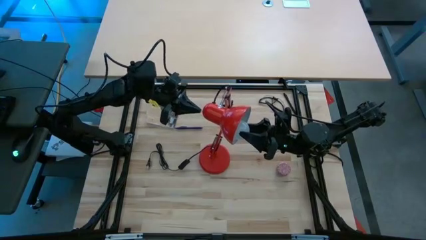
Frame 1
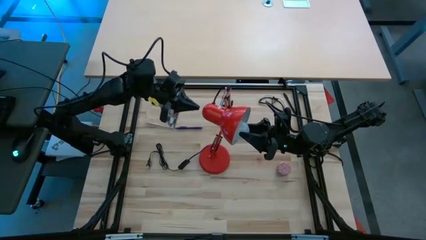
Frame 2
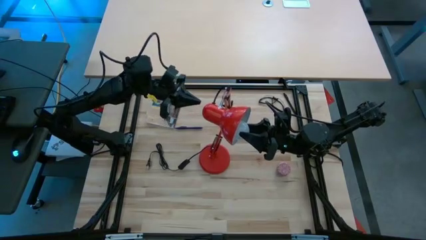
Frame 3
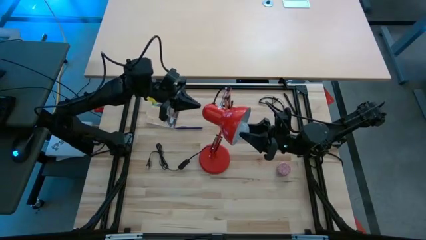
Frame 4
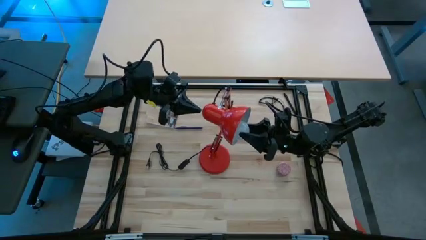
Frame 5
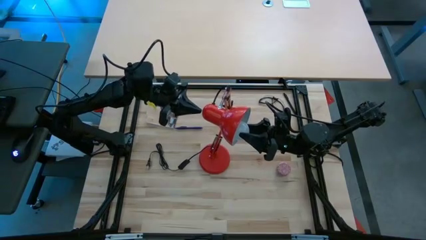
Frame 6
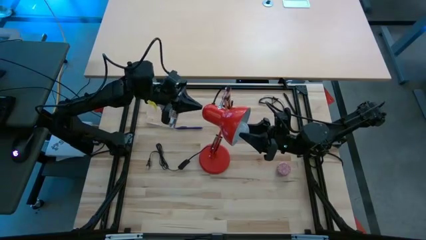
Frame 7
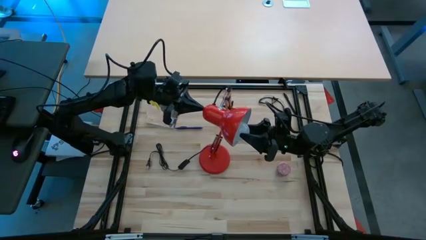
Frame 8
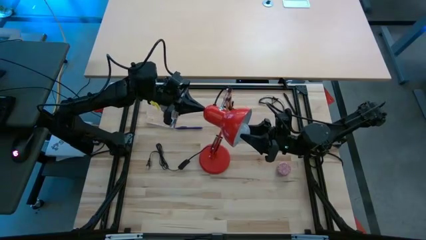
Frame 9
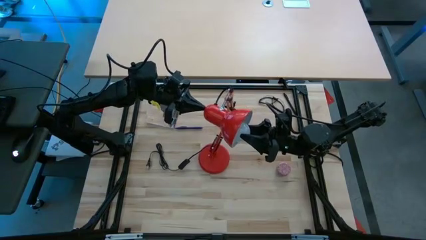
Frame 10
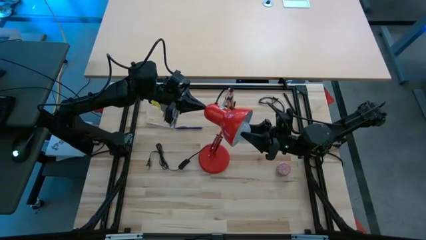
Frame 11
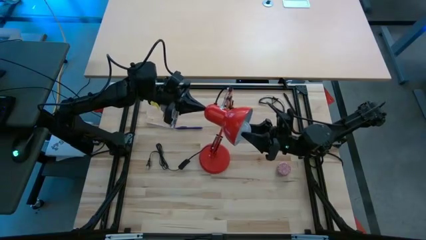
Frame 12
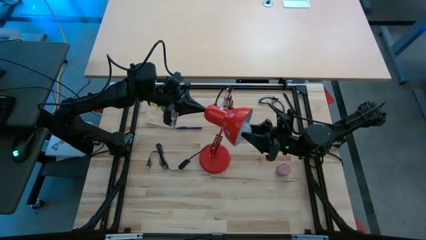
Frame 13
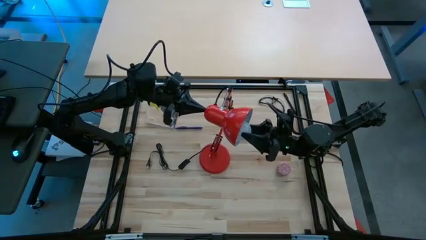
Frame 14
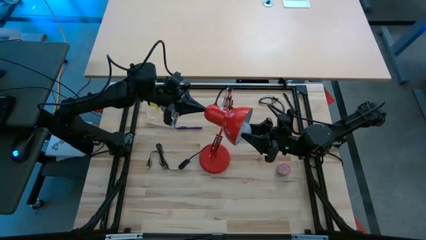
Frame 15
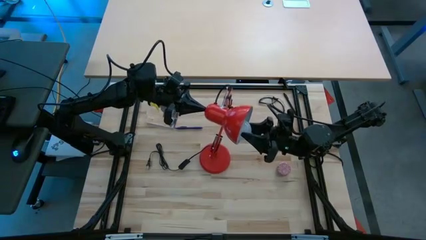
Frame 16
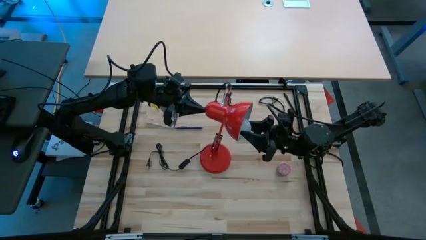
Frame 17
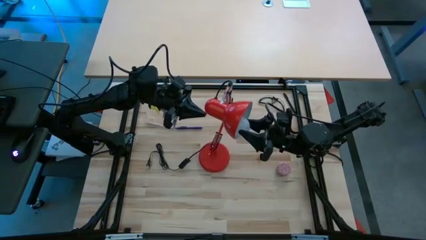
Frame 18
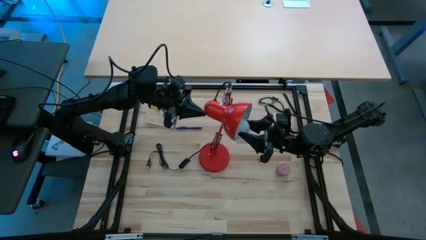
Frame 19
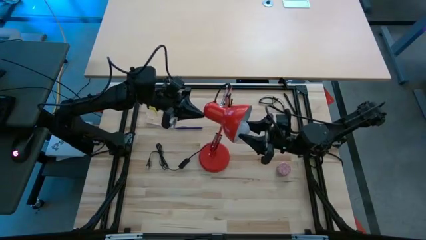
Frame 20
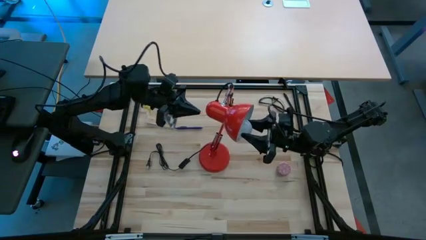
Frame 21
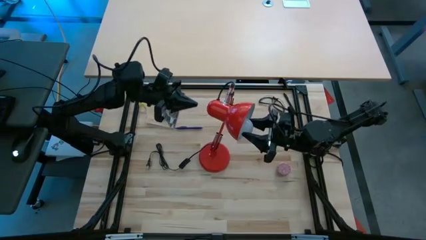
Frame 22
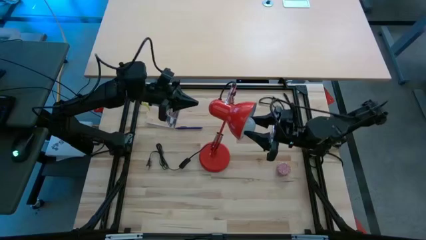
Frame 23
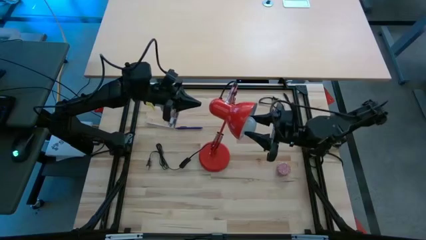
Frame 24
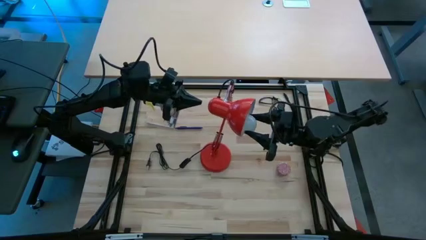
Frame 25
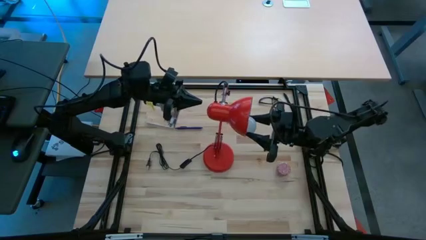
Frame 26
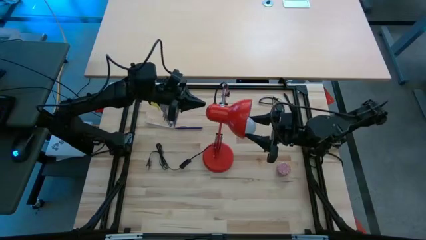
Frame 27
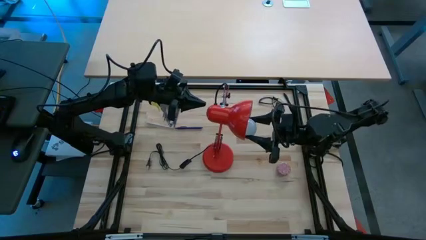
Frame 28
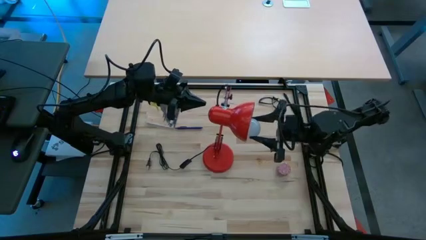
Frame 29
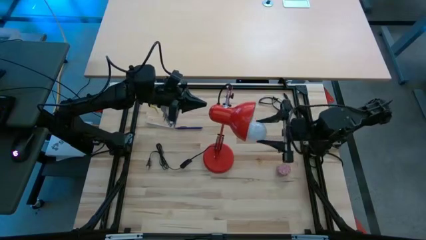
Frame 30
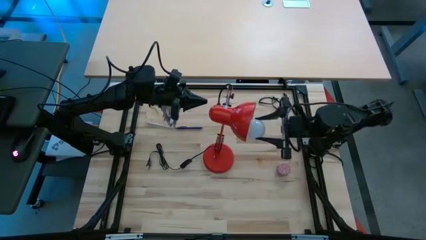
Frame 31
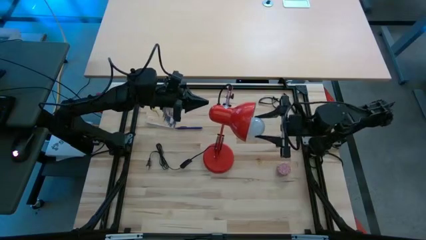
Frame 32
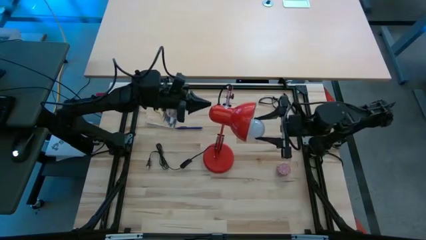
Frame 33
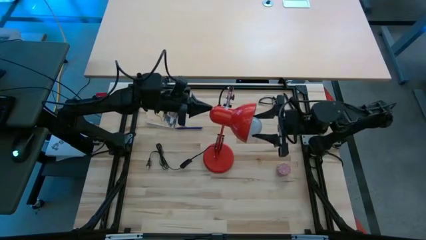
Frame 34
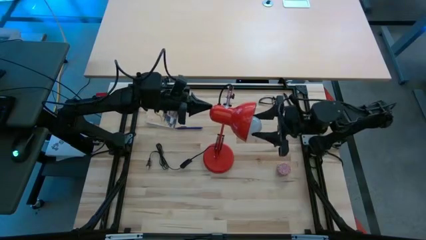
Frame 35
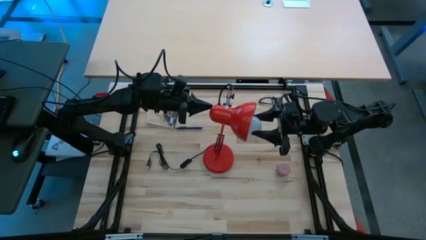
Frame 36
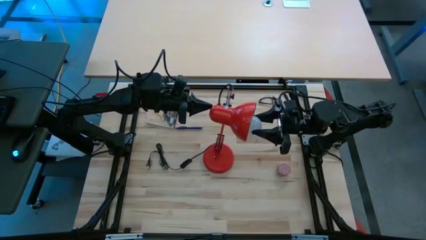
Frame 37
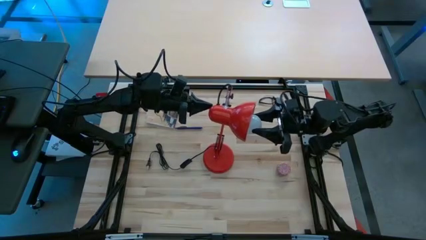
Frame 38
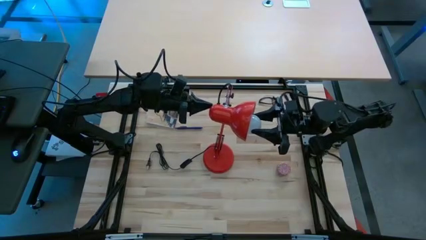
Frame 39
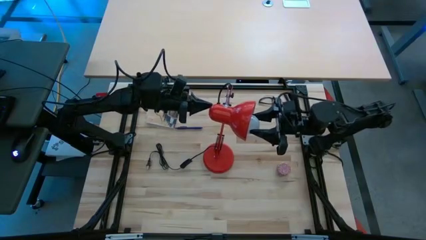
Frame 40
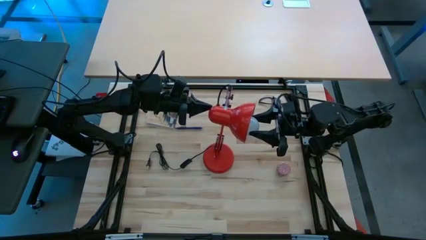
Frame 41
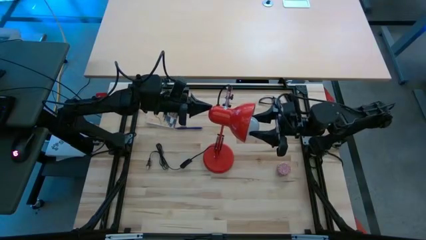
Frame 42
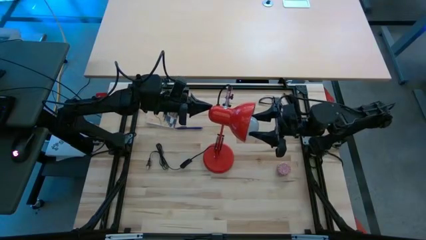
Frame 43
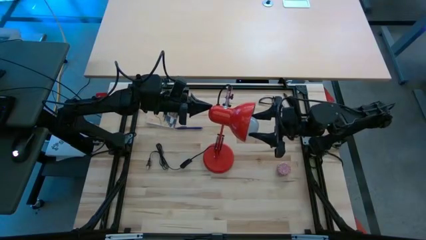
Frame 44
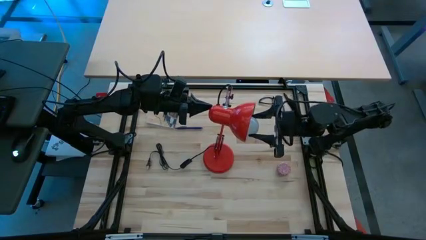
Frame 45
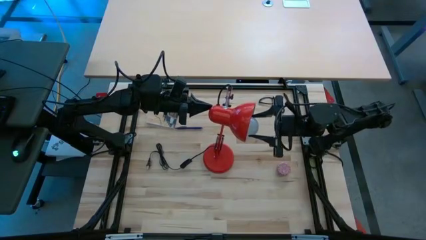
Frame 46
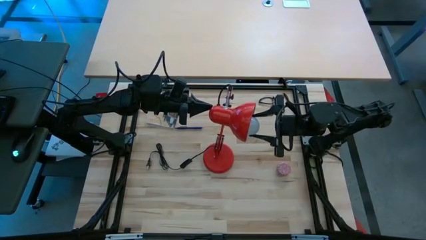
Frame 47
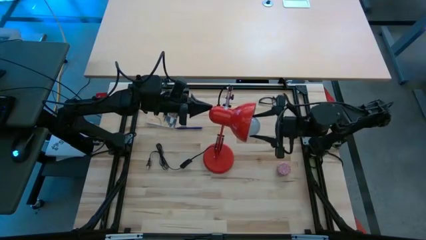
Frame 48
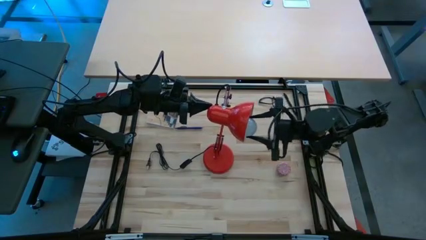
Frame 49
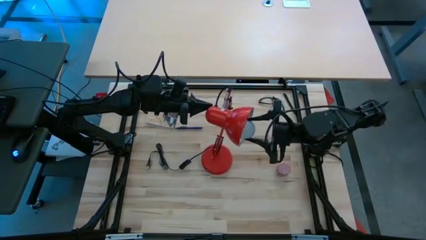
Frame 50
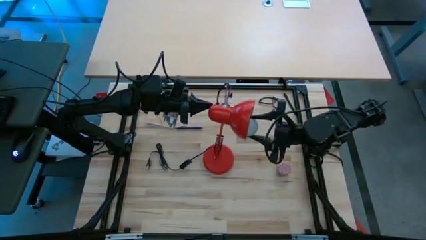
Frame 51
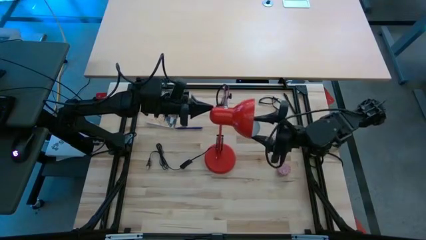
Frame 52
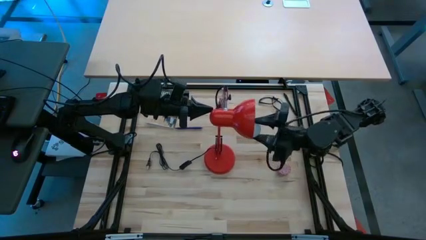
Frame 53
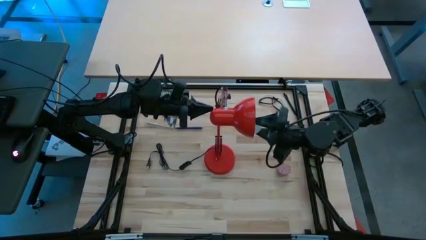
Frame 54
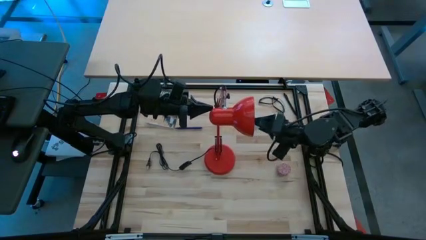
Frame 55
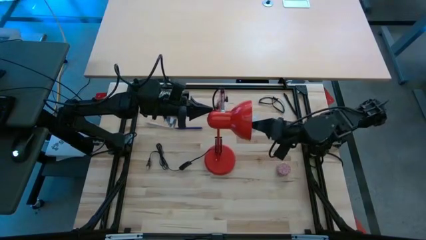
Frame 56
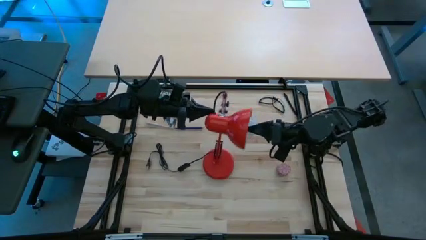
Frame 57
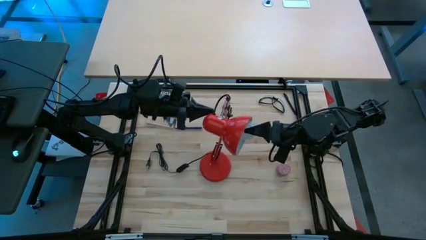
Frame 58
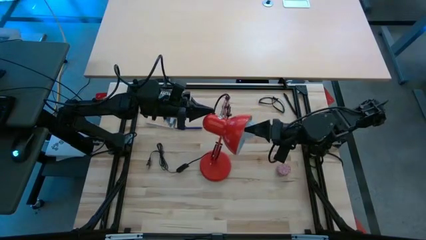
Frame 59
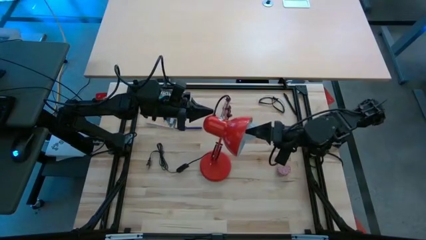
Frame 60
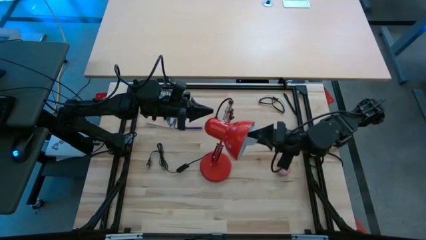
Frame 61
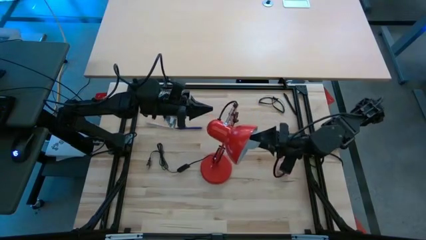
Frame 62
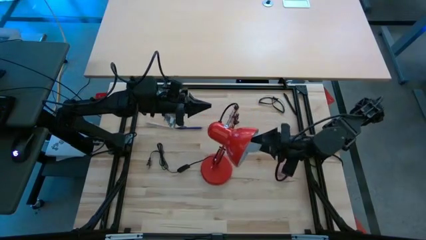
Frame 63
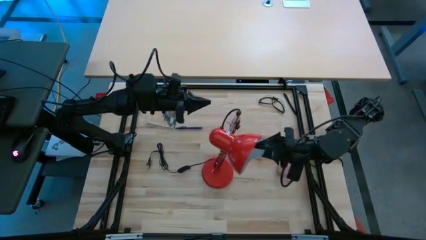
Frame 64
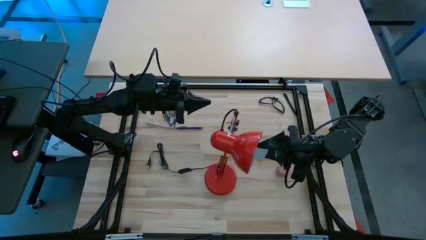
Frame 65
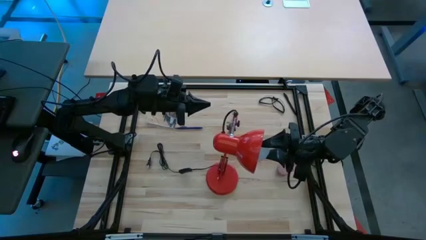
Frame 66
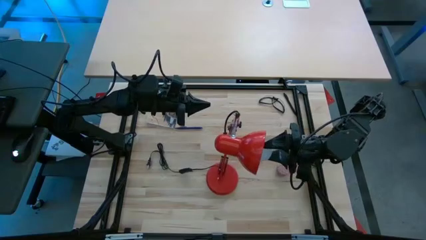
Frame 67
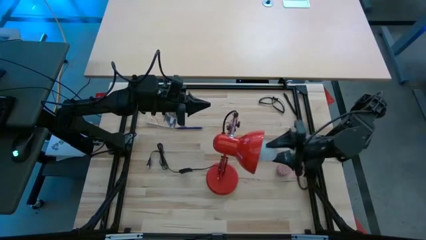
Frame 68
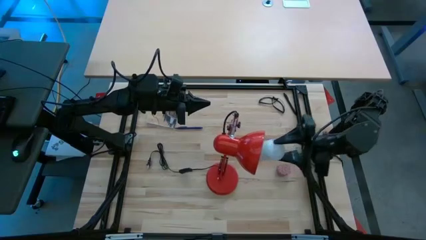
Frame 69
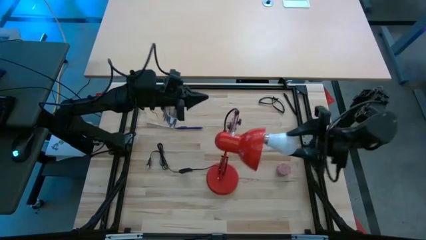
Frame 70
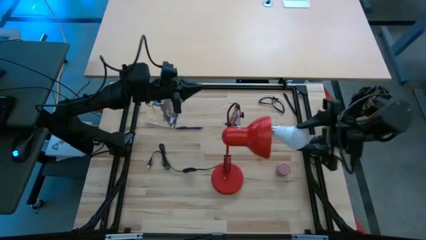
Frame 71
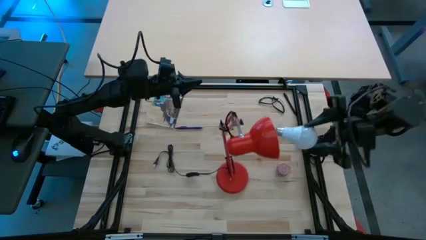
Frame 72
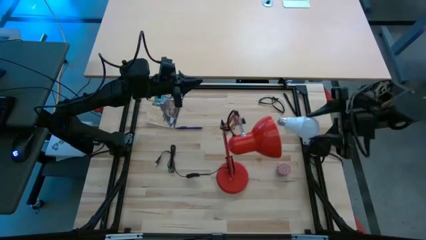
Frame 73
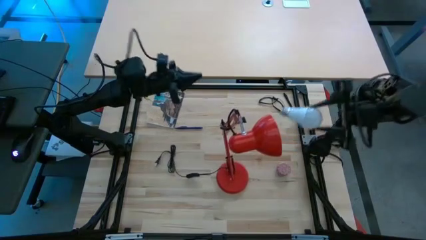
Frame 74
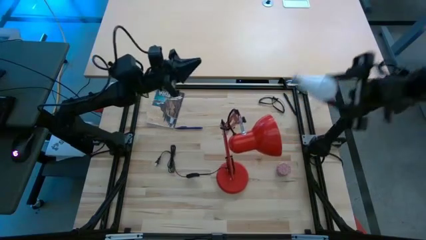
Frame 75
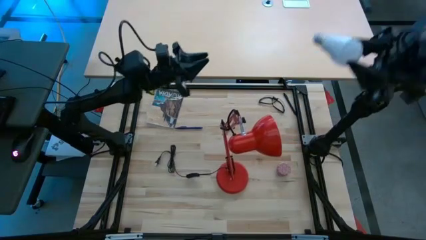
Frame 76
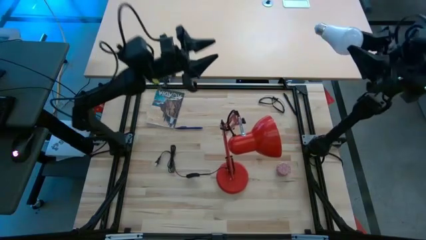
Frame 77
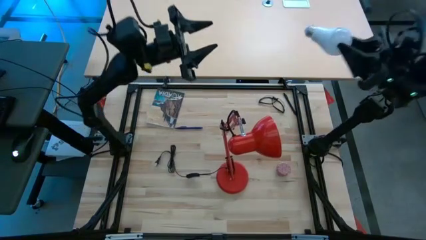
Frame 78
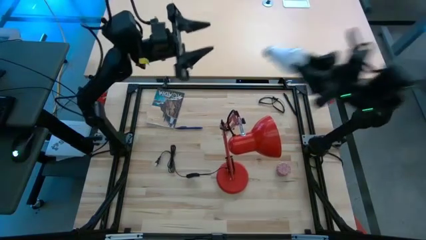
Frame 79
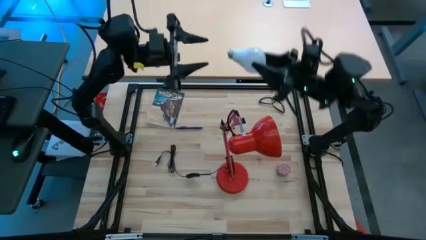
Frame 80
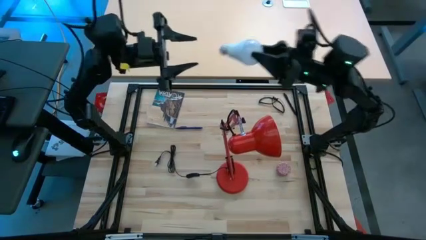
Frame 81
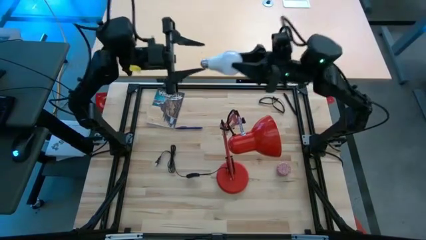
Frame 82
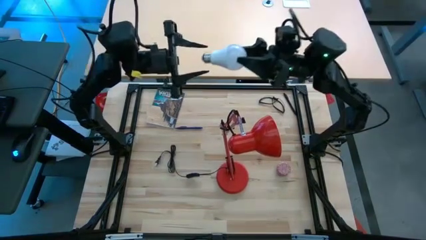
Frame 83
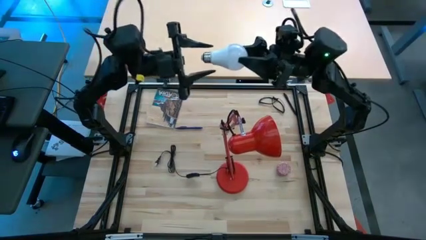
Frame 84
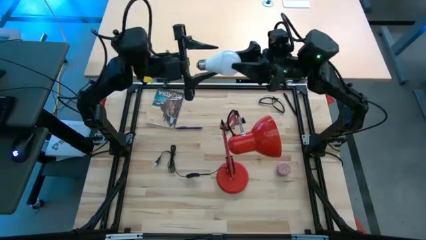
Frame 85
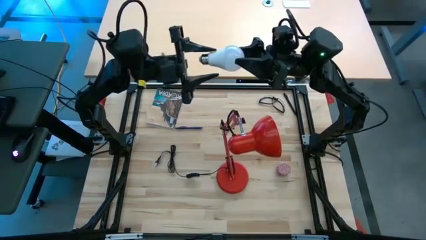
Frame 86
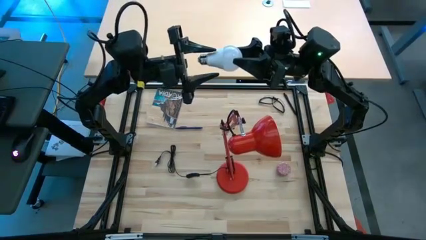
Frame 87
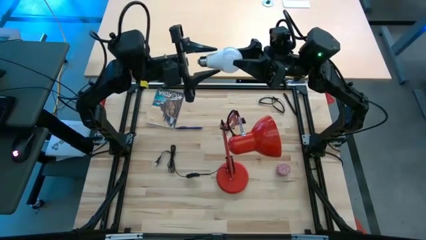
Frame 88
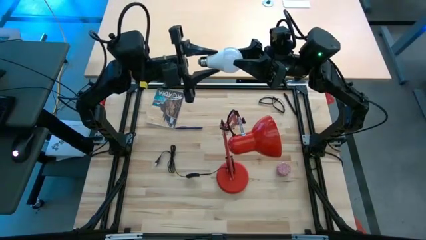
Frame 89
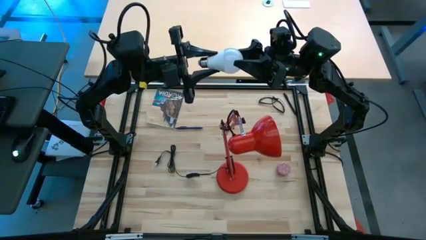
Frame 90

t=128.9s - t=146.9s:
Task: Screw lightbulb
Insert the lightbulb on the lamp
